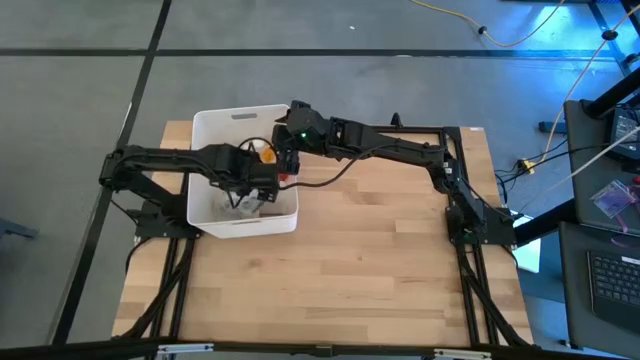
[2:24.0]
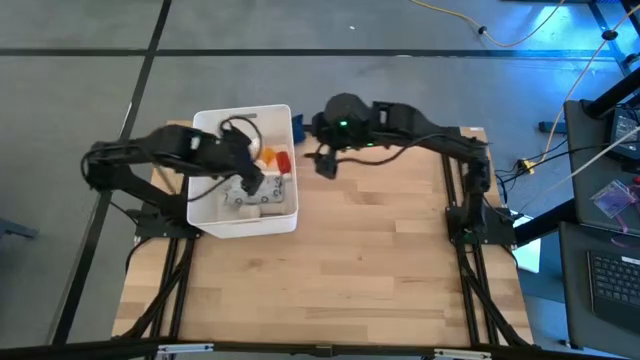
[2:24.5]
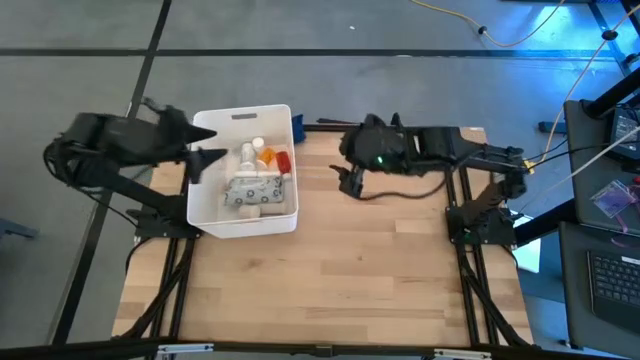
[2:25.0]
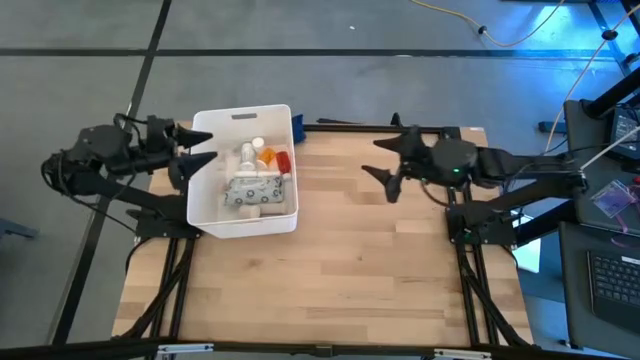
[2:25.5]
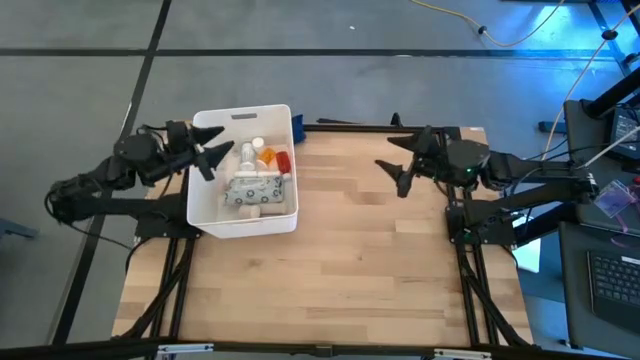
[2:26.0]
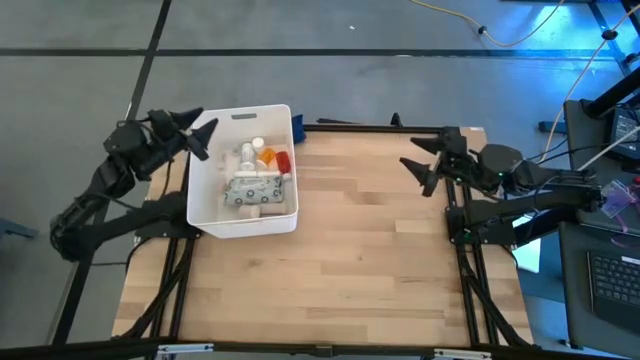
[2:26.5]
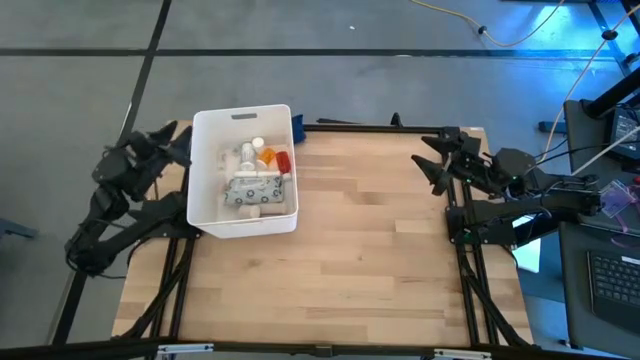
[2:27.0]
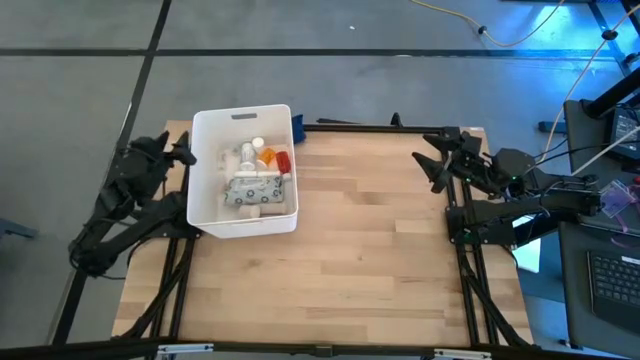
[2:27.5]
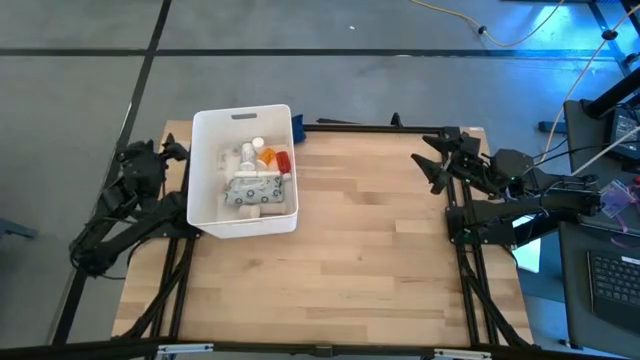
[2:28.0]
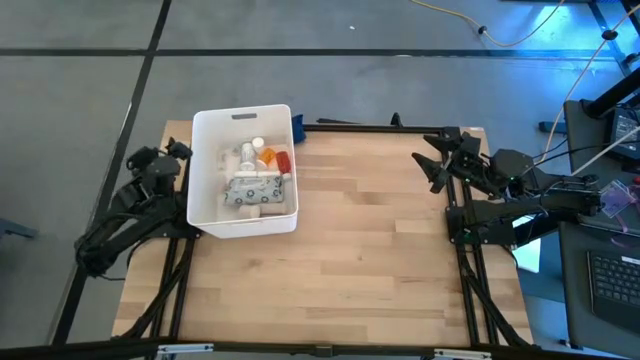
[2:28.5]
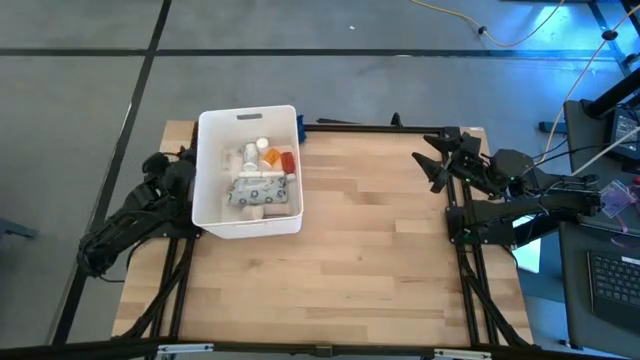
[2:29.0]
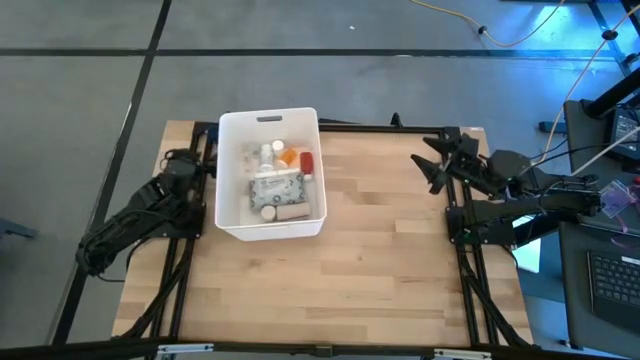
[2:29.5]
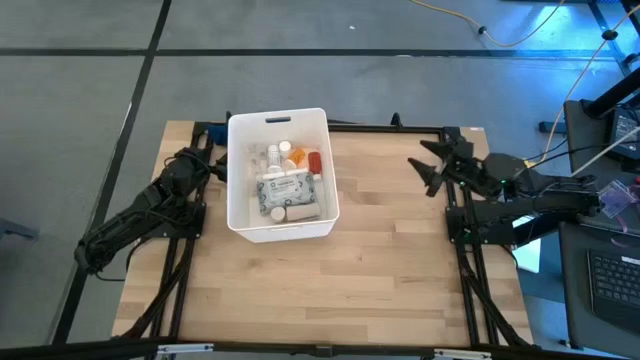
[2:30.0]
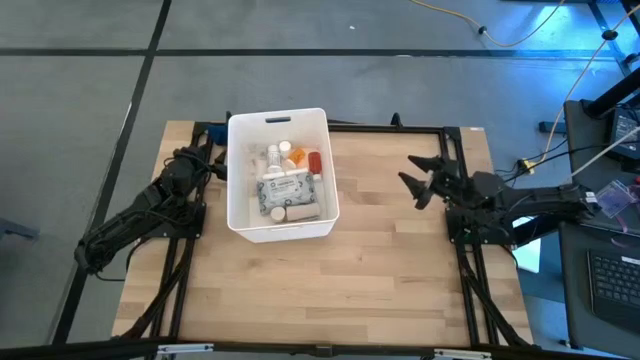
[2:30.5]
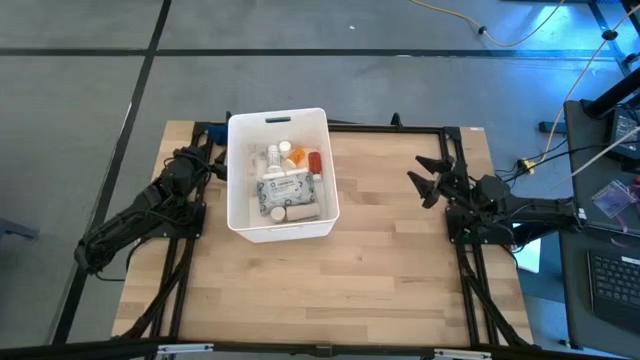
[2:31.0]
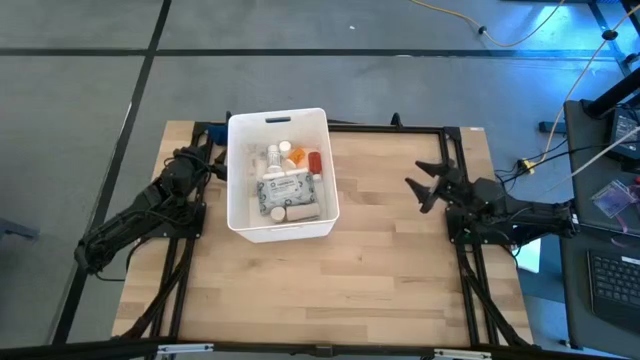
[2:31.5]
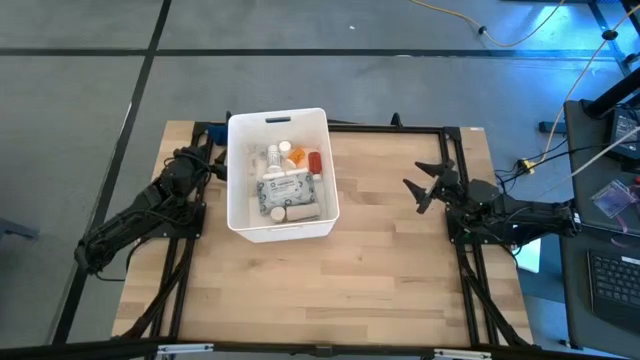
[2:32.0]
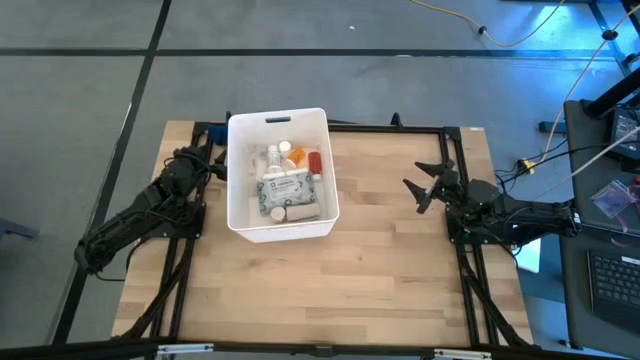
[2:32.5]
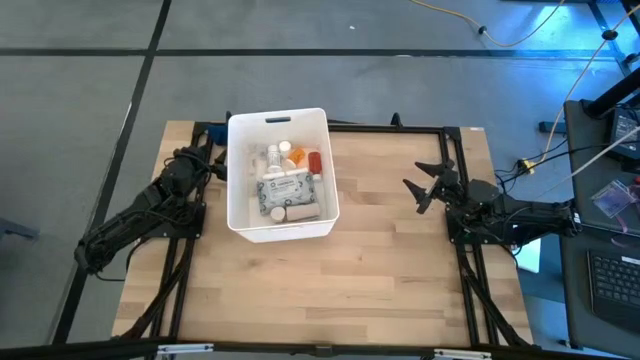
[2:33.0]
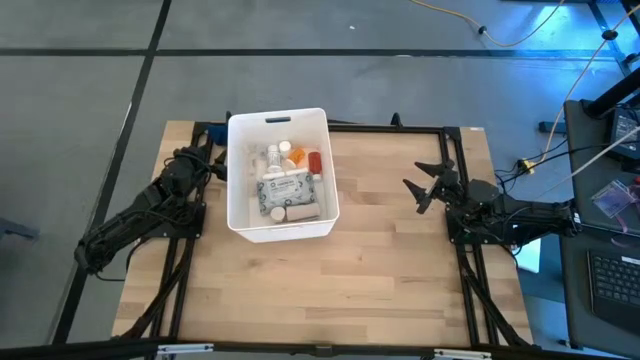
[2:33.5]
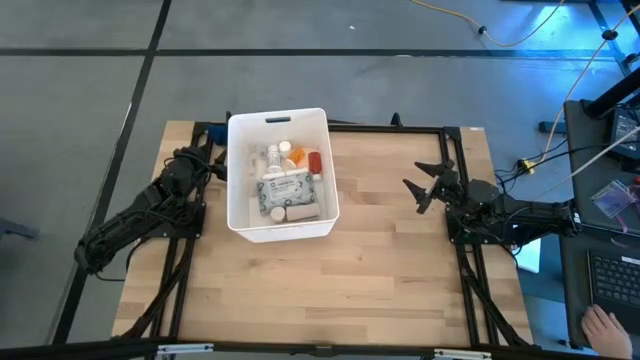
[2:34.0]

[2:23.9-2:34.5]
Task: Pick & place medical supplies in basket/bin
Return to Home Position

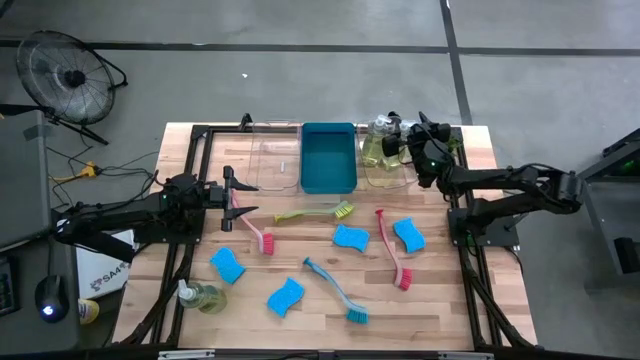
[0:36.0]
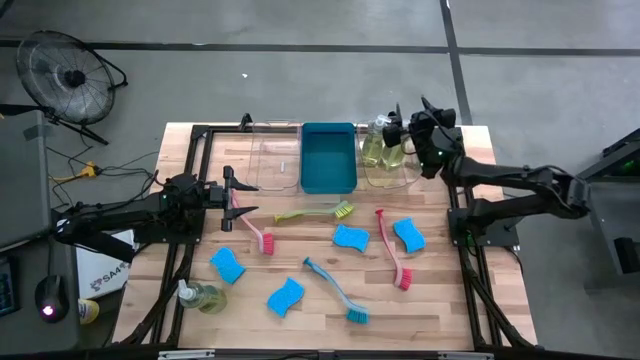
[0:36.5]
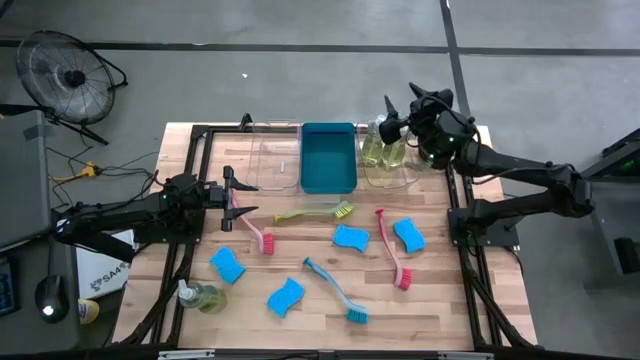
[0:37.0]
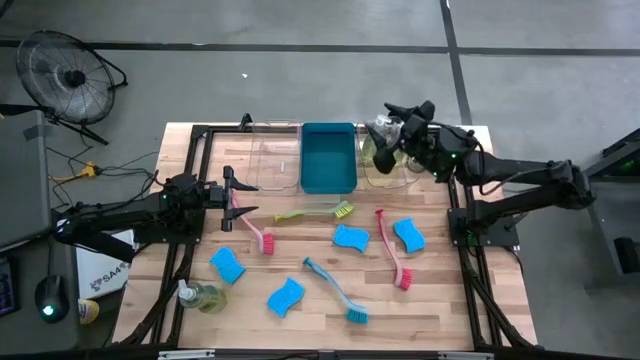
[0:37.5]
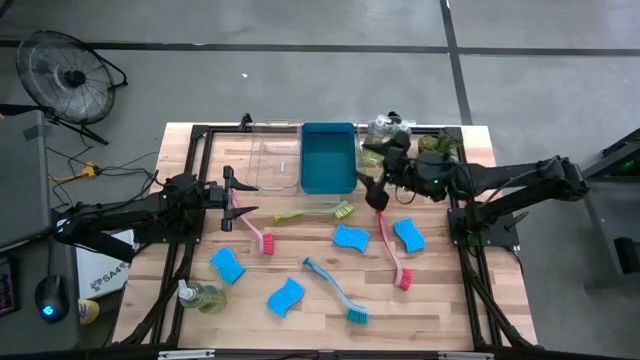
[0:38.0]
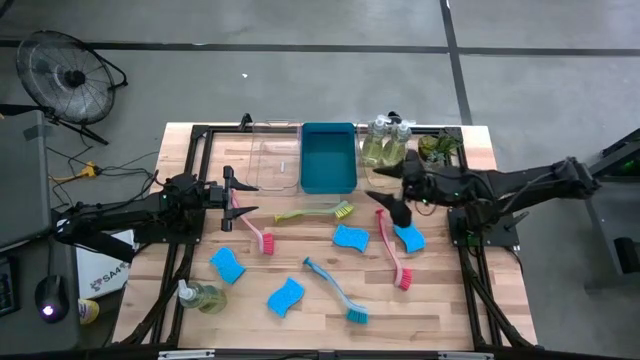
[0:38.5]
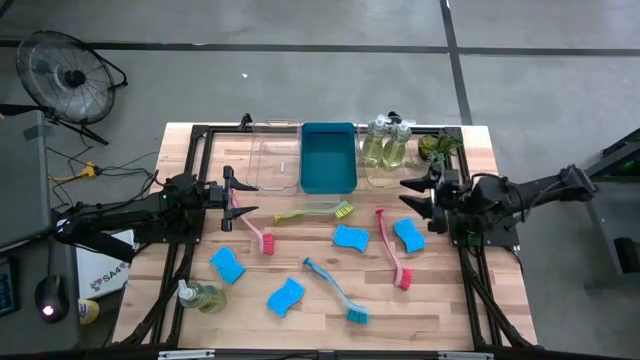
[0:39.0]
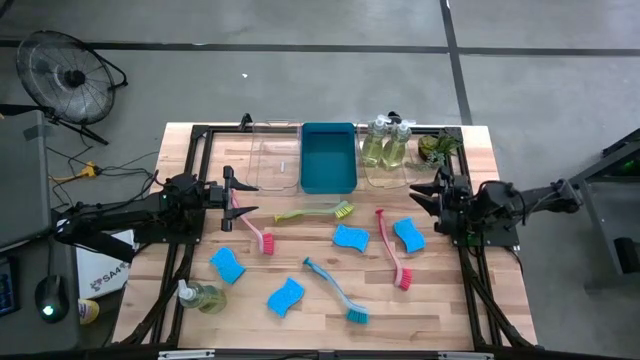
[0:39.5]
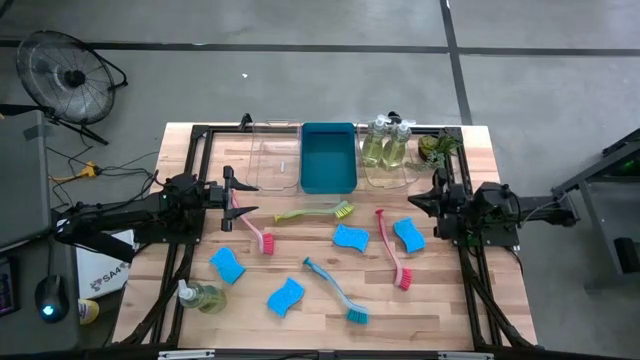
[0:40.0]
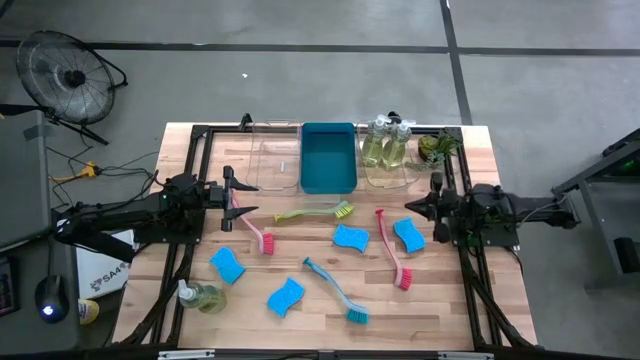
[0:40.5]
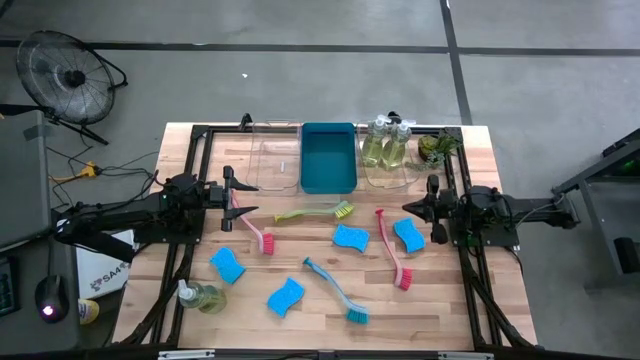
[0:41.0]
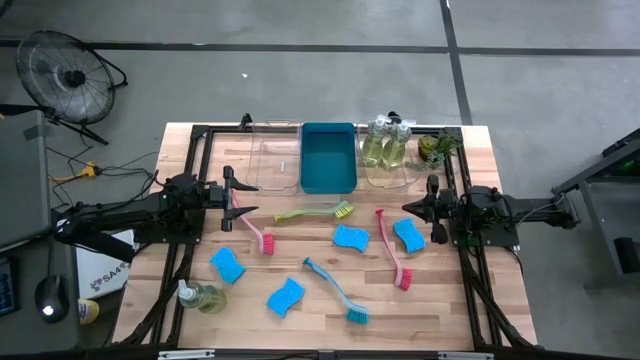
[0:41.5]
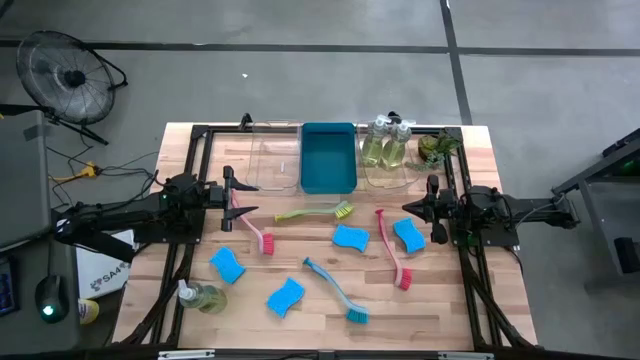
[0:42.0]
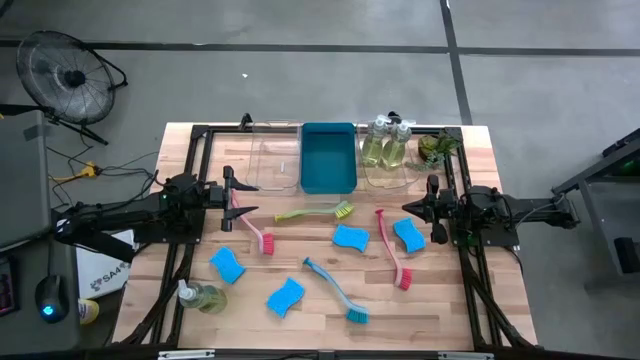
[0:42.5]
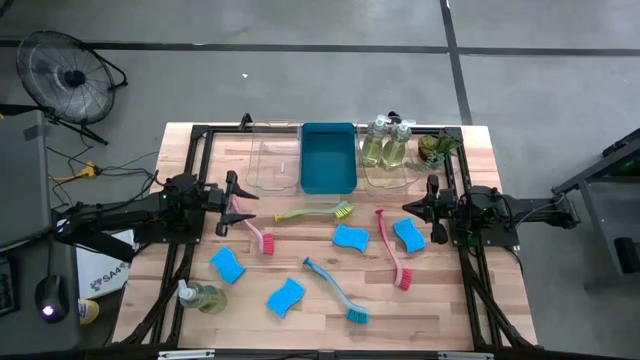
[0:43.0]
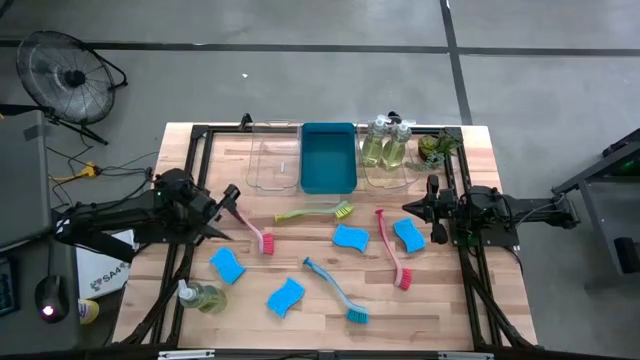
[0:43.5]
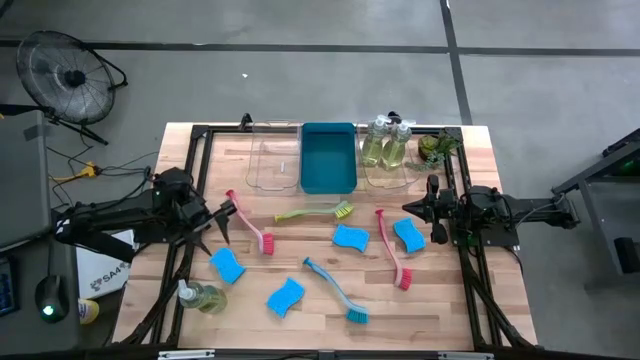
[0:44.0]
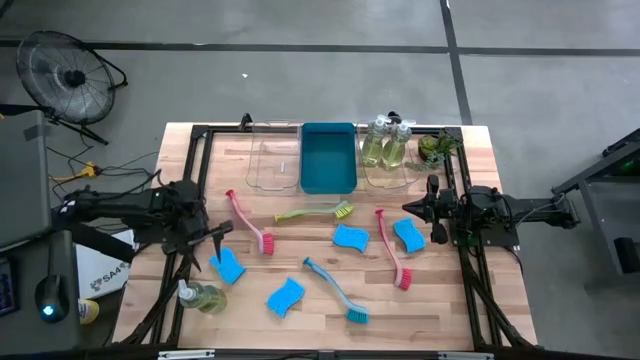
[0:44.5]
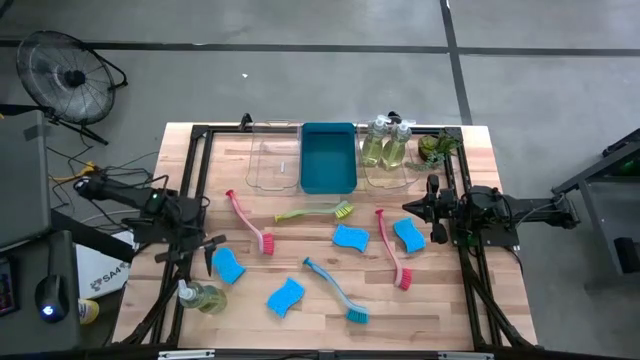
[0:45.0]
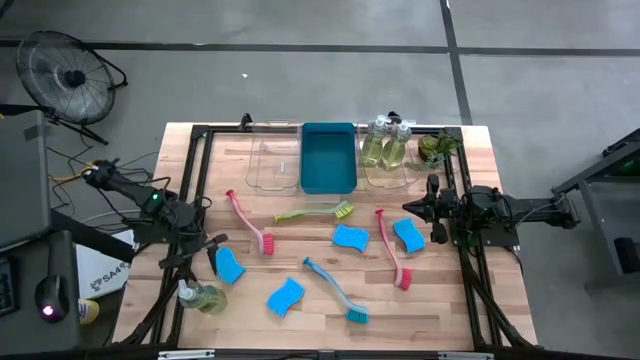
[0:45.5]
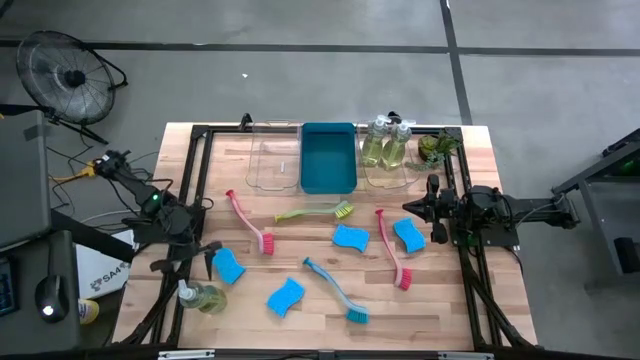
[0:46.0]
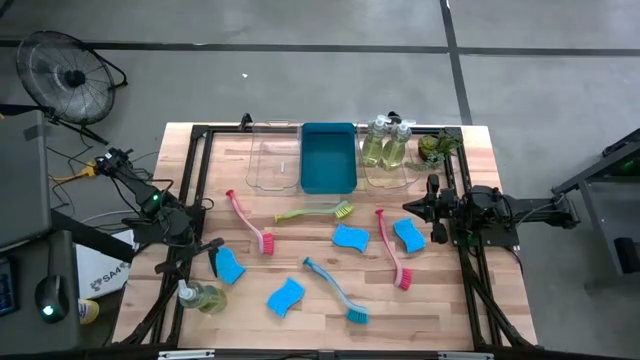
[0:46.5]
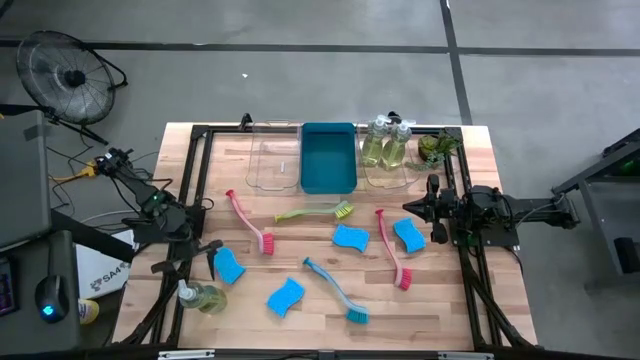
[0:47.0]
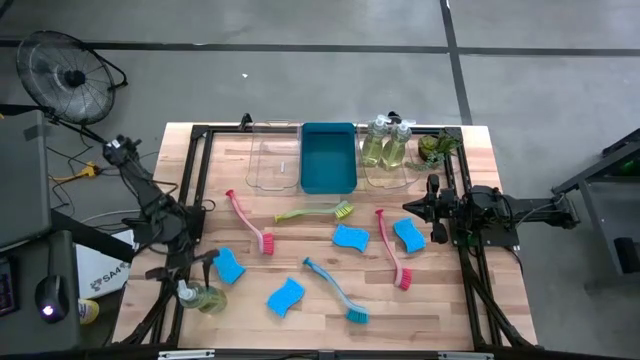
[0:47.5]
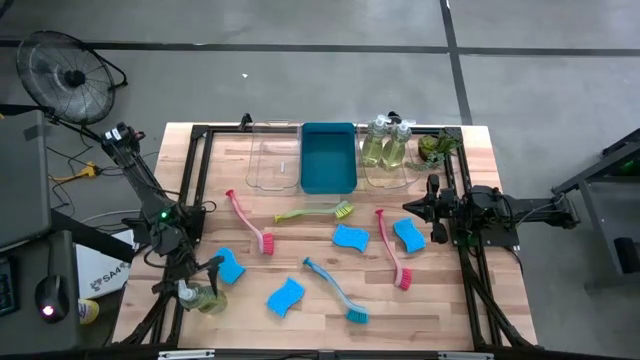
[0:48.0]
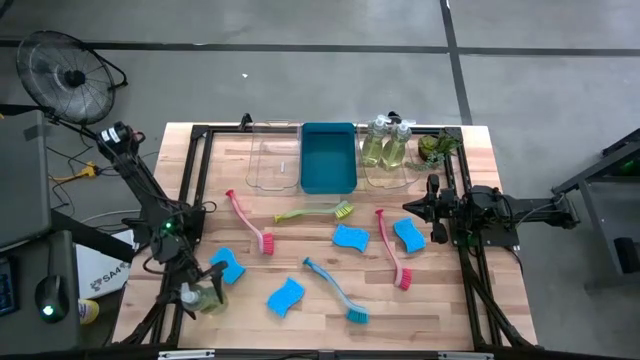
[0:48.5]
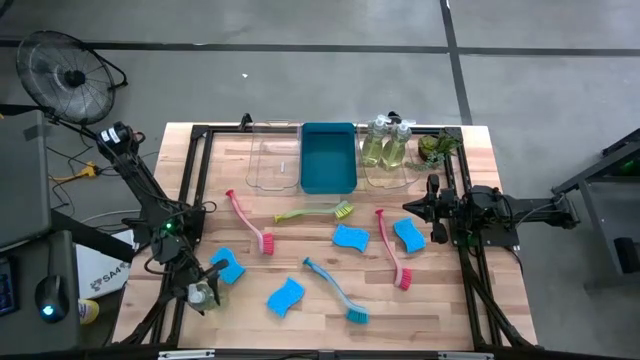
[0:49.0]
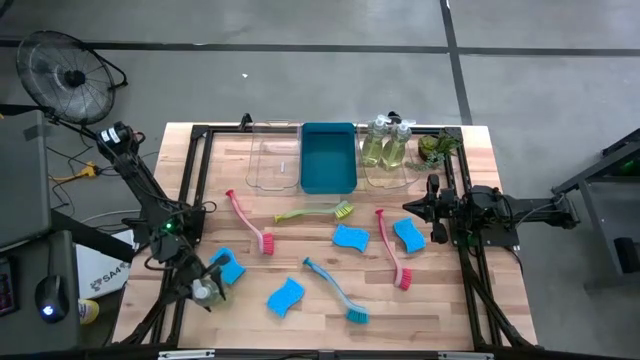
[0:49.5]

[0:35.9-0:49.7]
Task: Pick & Place Kitchen Sink Supplies
Put the green dish soap into the right transparent bin
